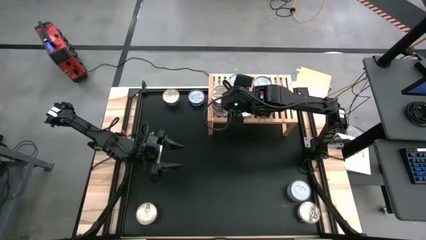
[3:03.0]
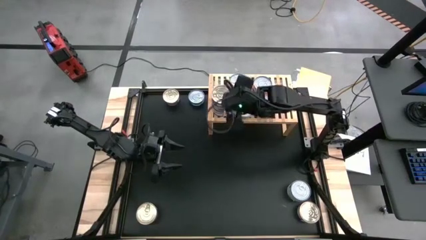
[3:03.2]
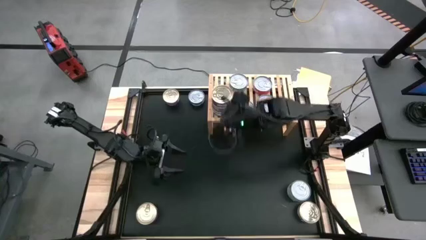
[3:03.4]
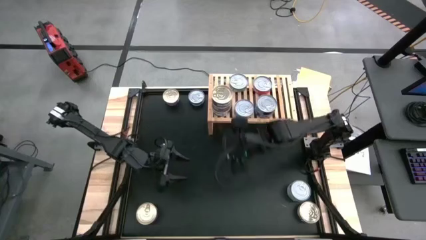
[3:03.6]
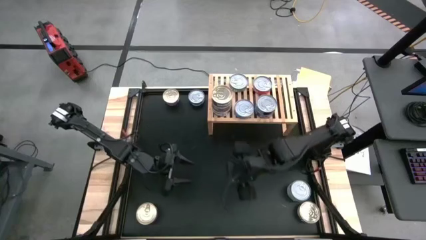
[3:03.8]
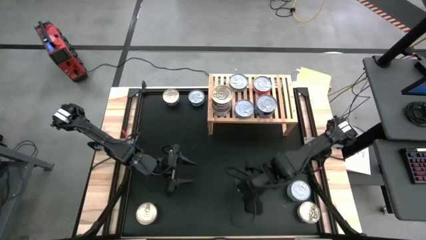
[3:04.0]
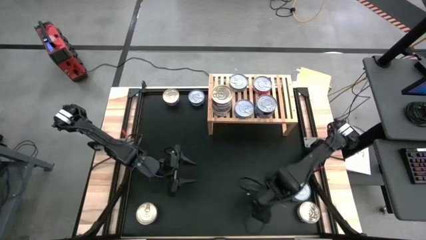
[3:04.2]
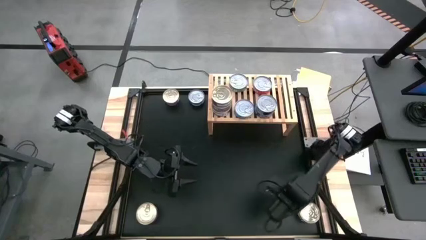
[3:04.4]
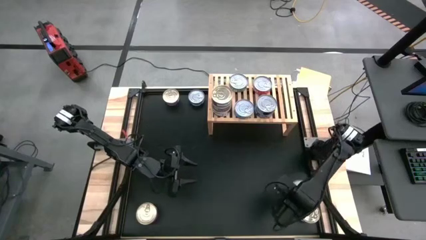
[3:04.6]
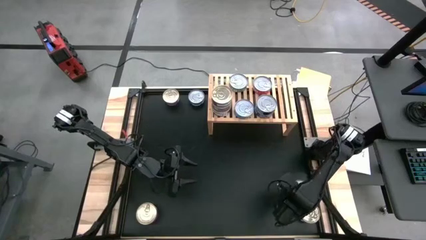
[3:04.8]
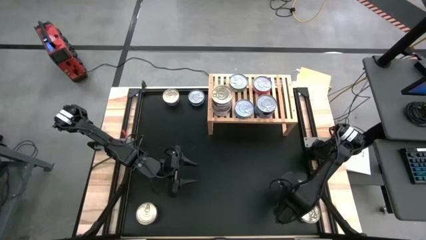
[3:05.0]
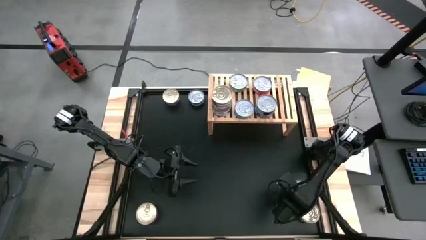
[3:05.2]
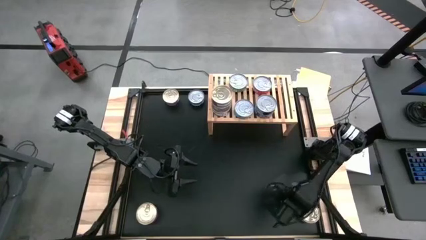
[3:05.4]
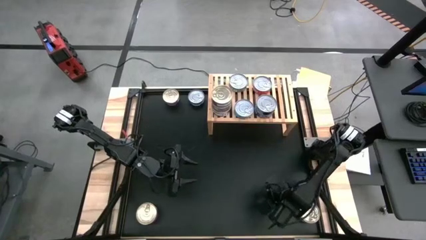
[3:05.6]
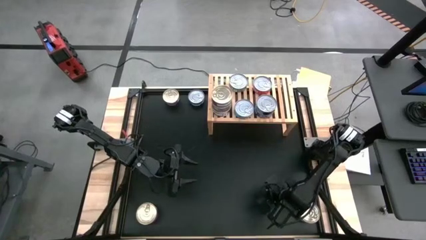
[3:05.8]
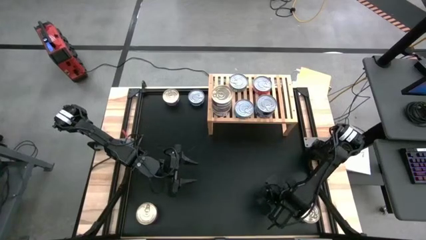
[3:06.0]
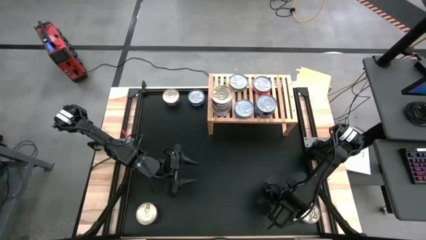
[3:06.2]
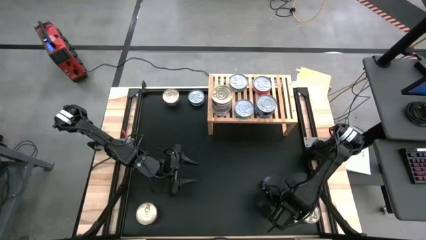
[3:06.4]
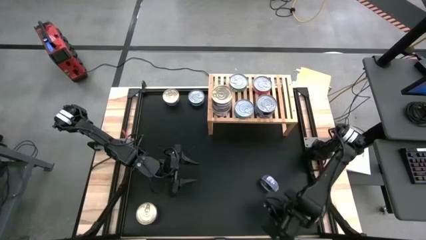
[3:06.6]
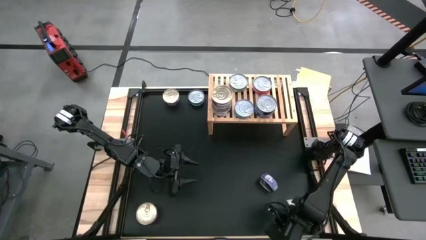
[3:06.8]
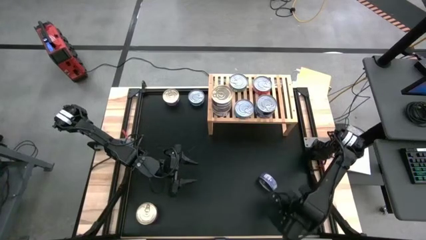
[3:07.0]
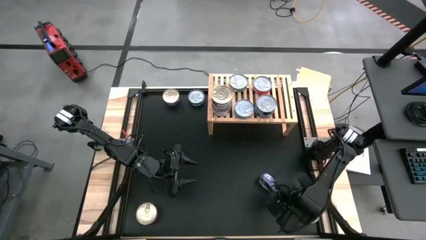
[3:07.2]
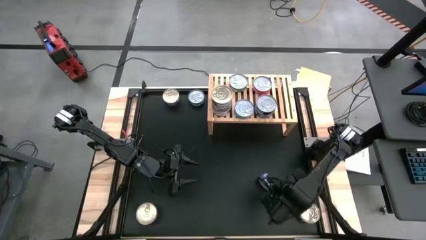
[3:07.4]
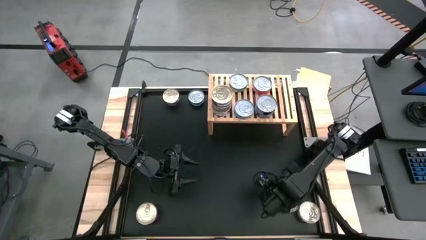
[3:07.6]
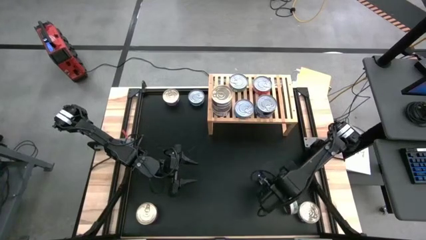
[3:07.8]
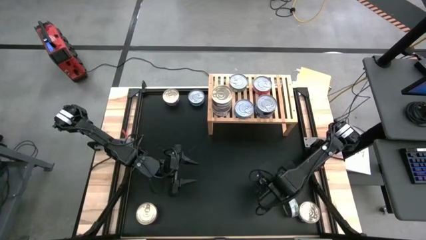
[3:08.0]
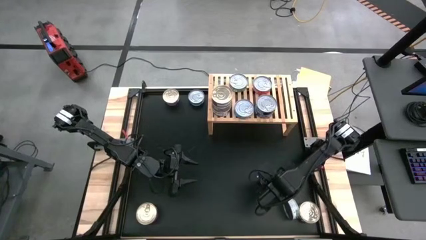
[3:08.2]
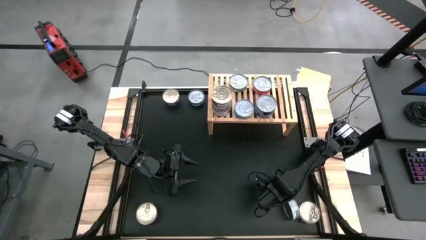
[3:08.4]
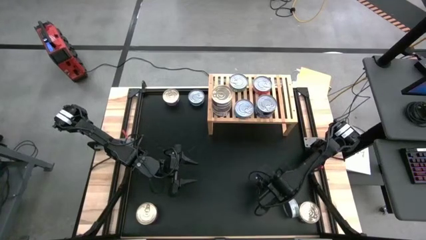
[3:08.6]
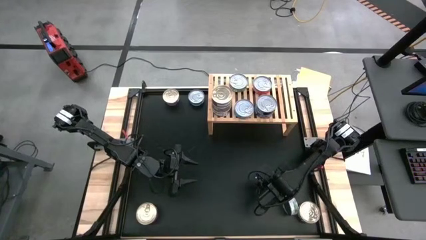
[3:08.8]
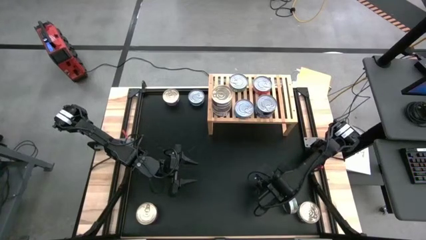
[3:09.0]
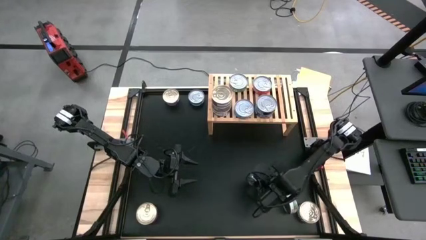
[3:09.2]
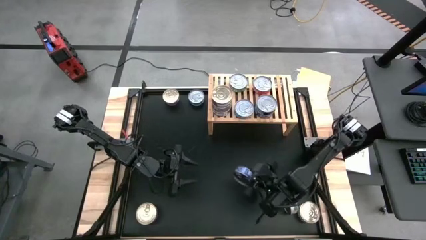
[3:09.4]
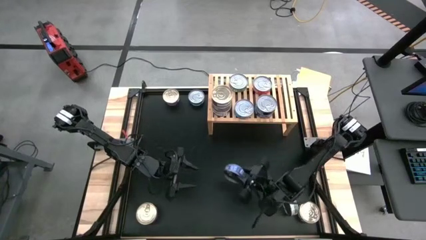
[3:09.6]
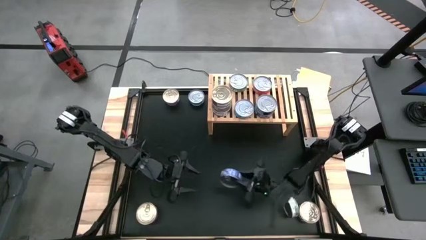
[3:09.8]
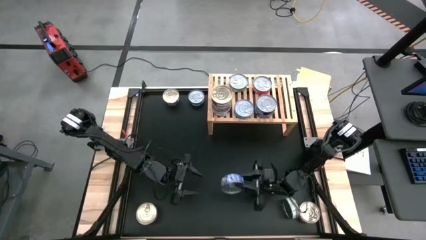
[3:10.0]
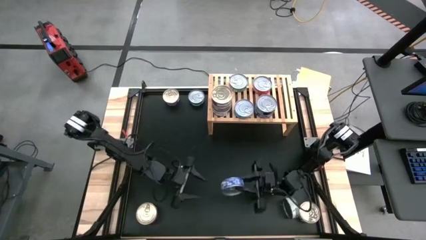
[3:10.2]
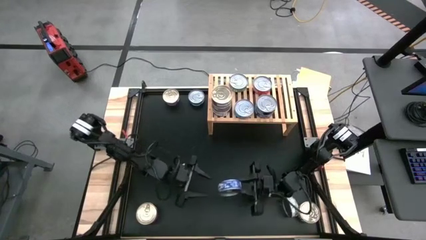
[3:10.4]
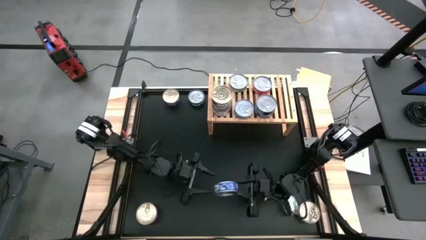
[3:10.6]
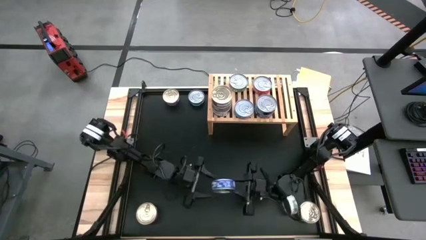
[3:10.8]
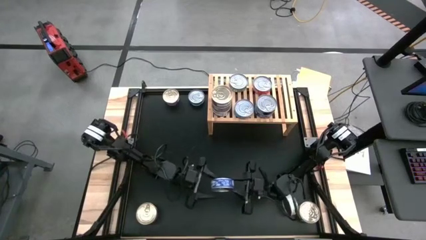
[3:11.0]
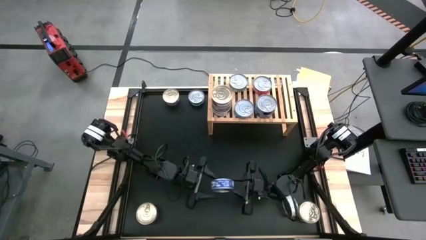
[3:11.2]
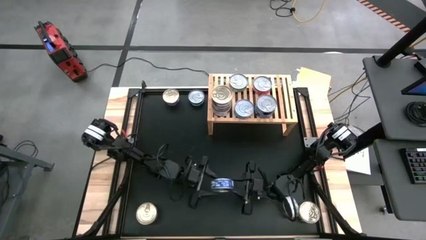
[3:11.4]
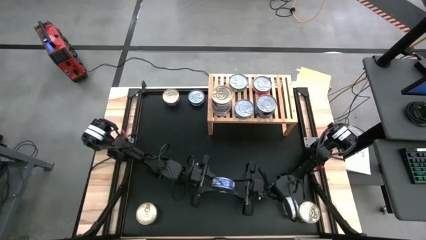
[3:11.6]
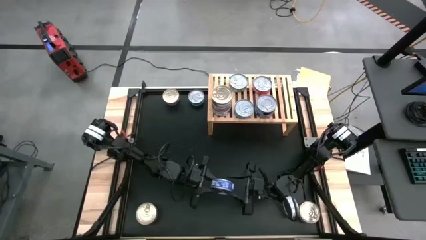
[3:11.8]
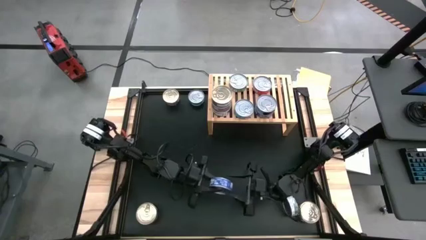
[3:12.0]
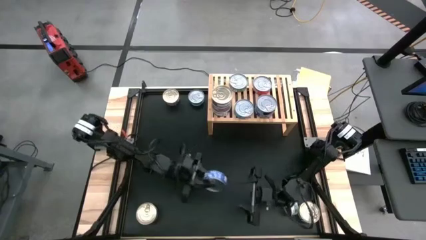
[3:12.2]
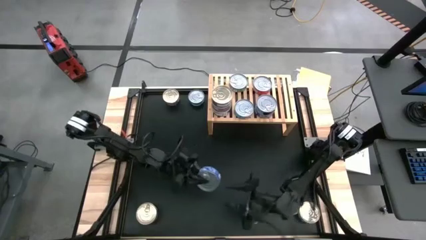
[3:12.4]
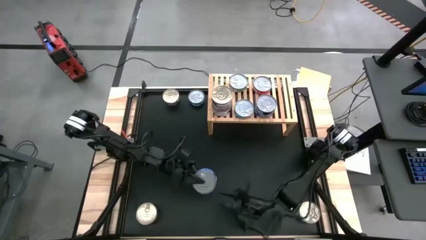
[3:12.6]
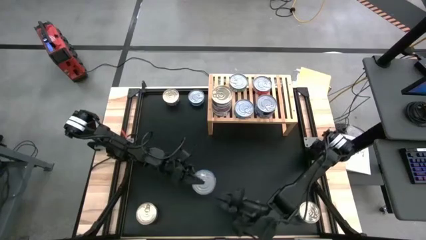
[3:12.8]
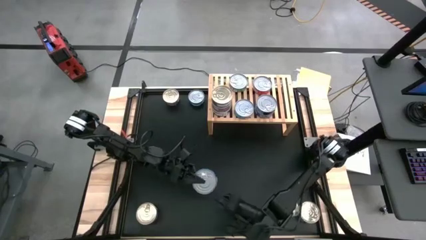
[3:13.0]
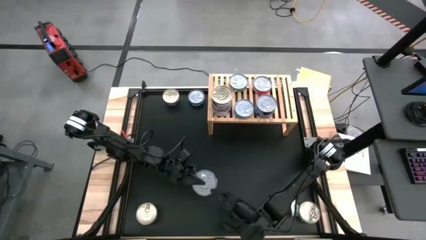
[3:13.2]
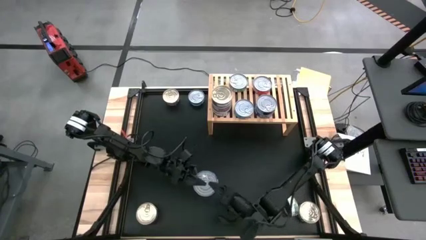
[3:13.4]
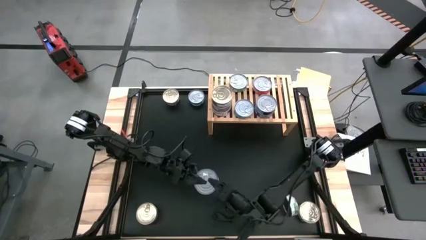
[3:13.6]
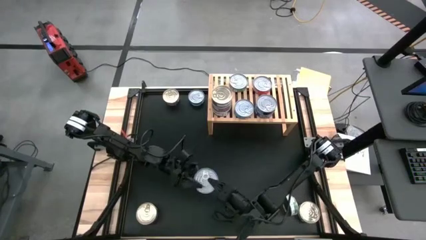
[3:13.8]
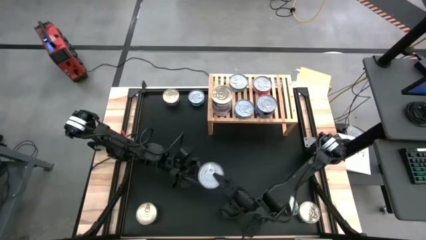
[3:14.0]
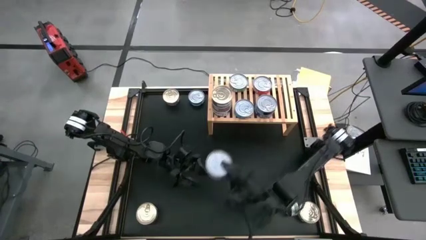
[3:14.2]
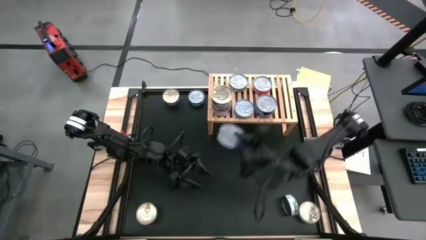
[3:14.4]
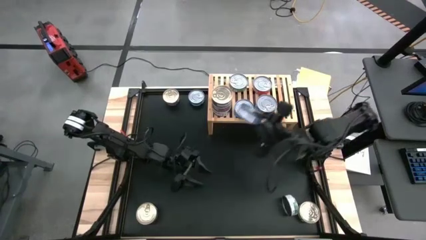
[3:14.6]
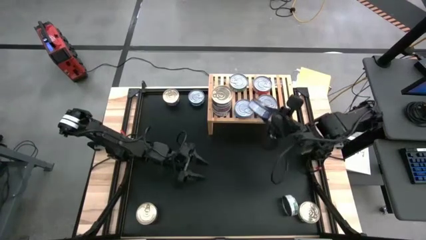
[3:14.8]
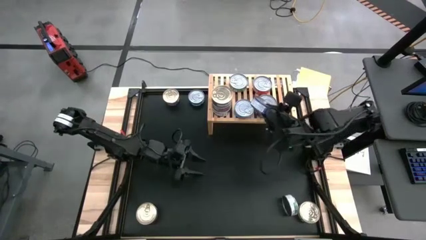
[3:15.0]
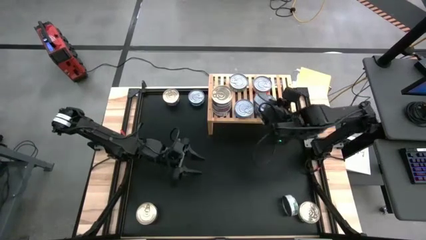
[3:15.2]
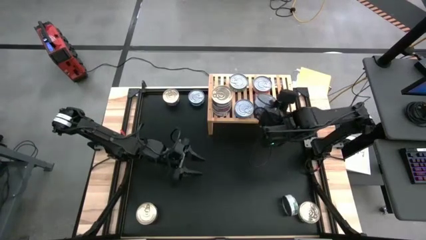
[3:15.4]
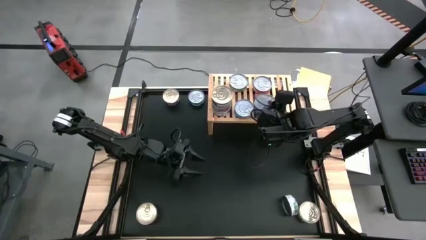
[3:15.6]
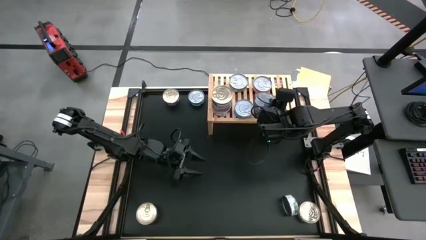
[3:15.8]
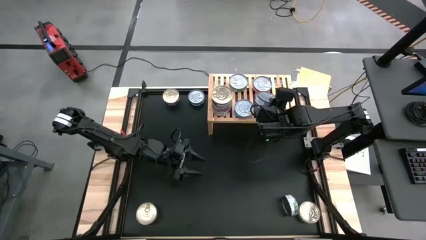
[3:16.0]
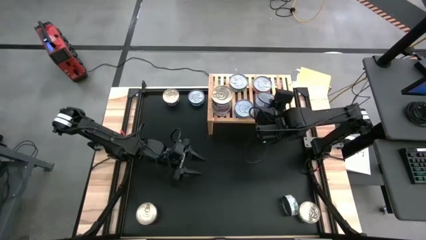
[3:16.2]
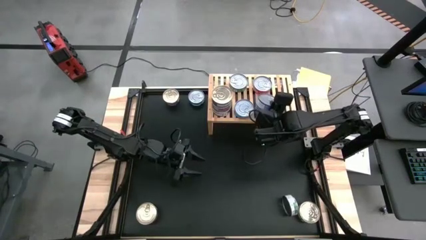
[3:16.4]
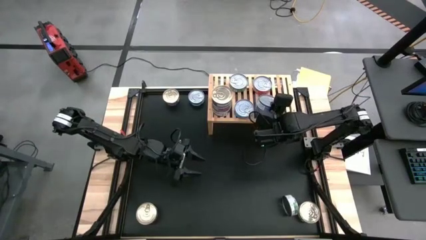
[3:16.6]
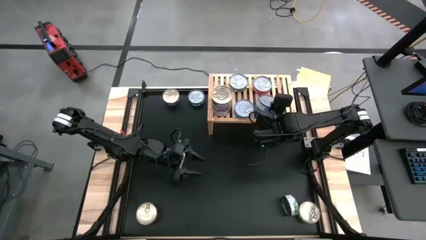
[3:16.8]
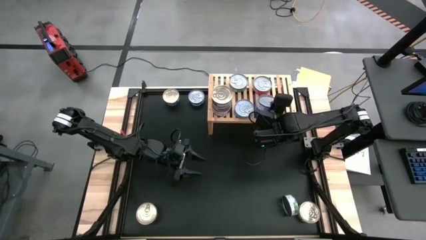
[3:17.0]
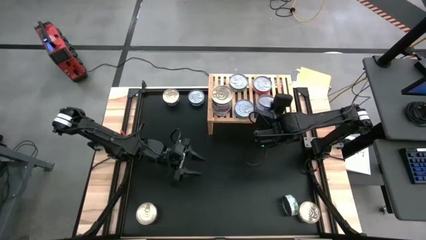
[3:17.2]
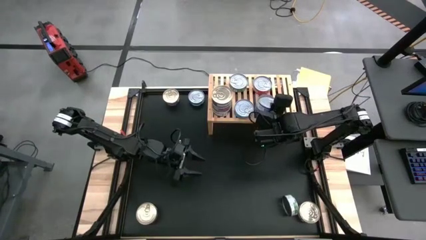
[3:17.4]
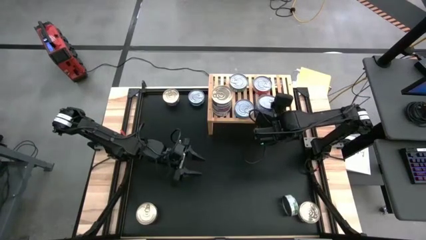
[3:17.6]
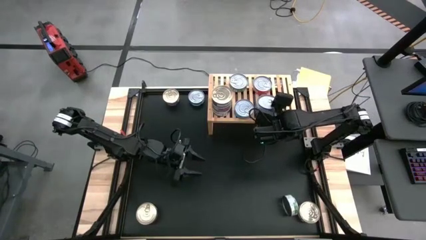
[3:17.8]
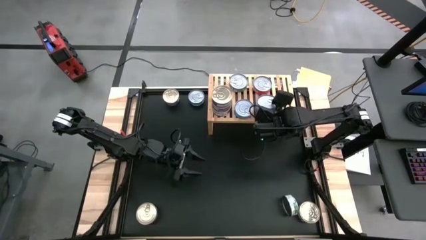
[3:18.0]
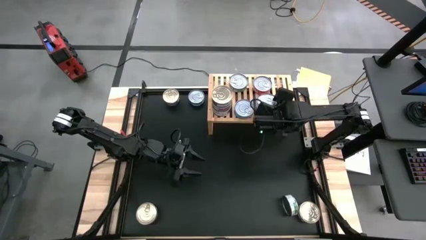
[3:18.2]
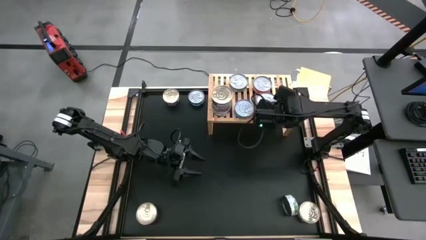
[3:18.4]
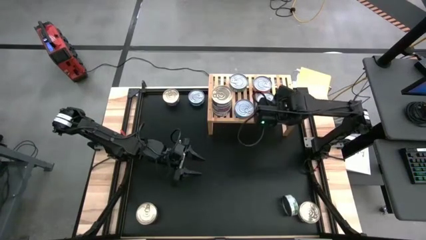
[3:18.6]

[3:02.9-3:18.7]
Task: Stack canned seafood by type on shelf
Stack the blue tuna can on top of the blue tuna can on the shelf
